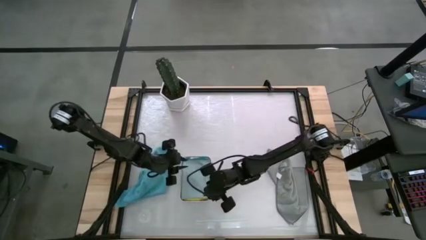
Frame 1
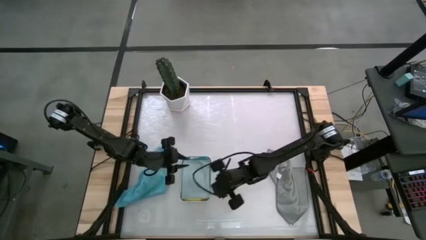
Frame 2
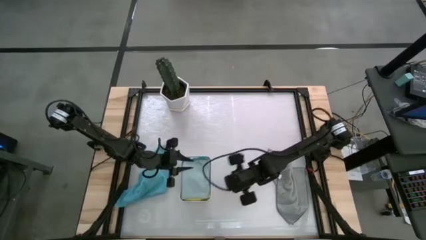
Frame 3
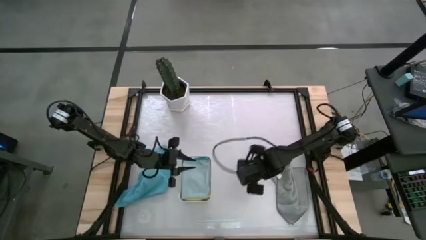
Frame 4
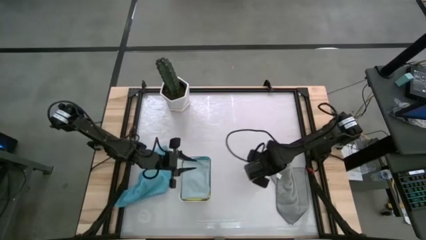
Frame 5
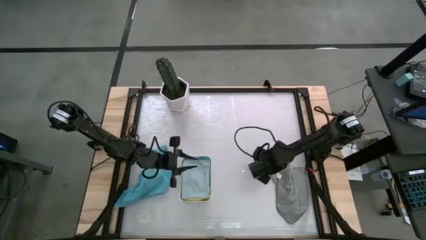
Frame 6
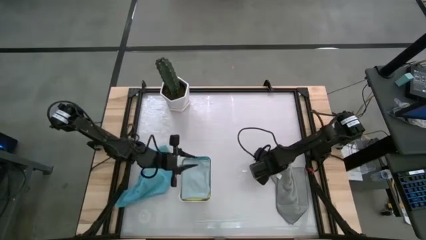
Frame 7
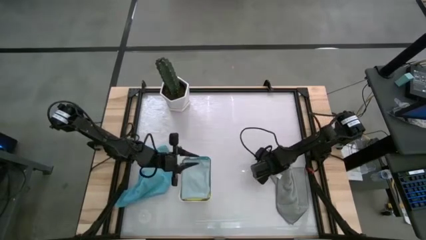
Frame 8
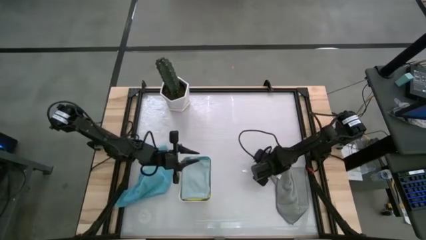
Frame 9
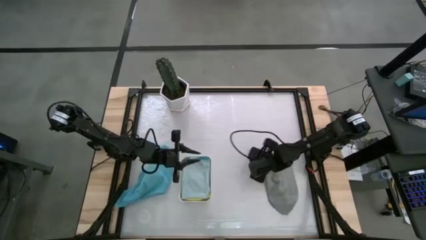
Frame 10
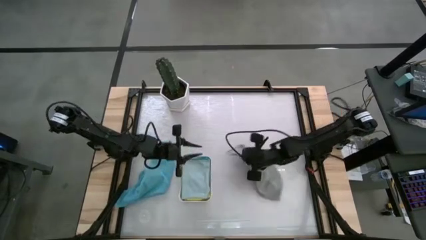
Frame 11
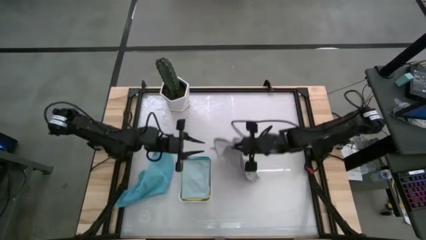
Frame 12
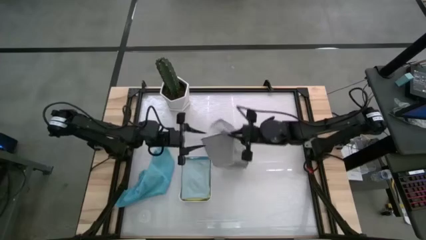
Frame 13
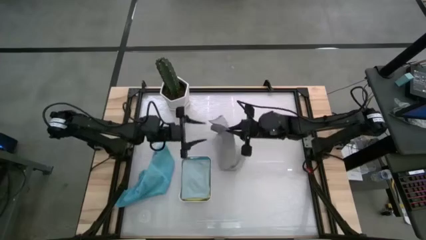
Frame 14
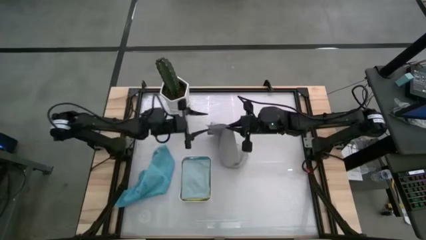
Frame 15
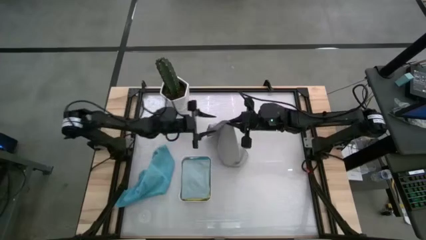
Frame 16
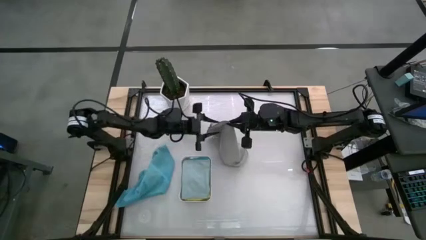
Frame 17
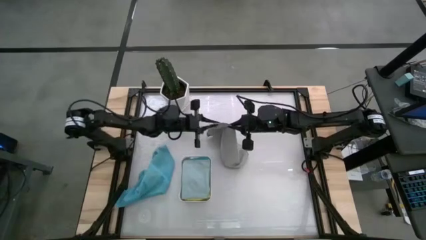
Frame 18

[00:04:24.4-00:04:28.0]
Task: Fold microfiber towels
Fold the gray microfiber towel

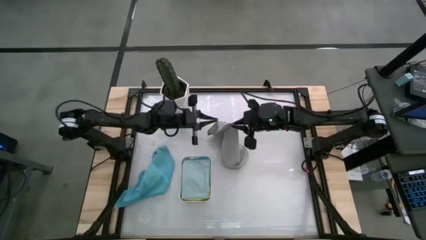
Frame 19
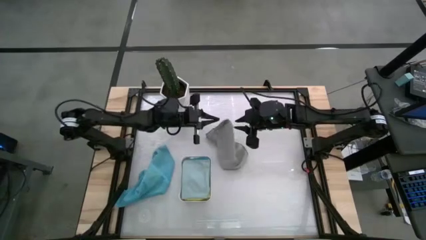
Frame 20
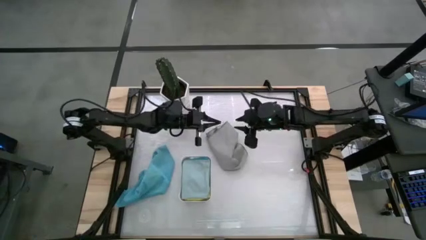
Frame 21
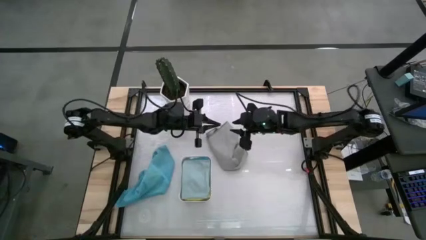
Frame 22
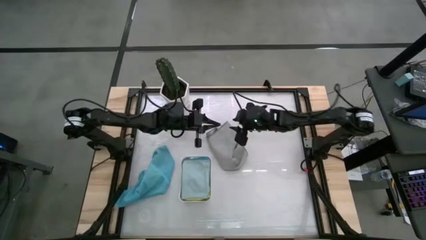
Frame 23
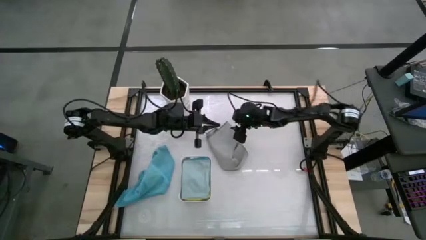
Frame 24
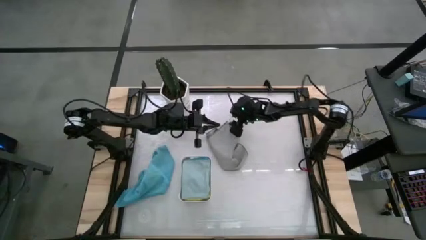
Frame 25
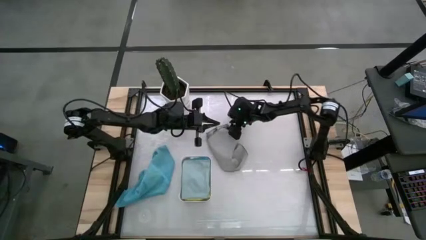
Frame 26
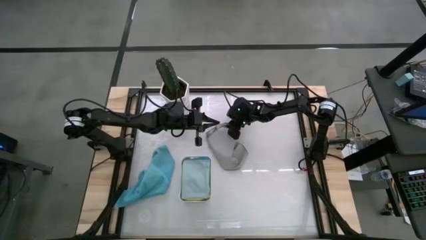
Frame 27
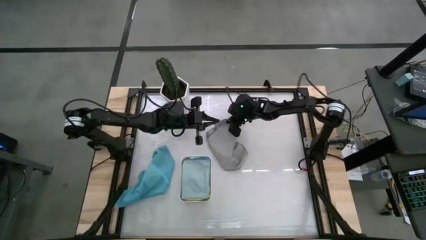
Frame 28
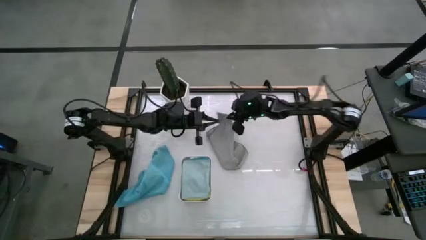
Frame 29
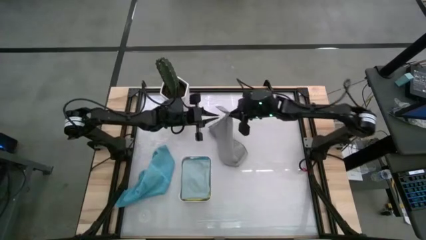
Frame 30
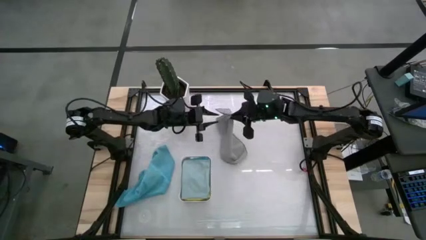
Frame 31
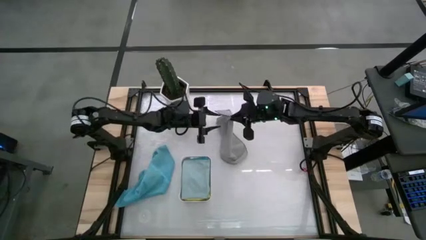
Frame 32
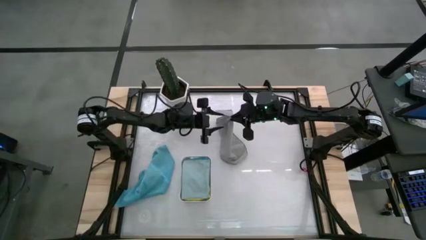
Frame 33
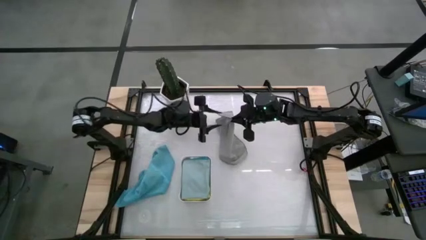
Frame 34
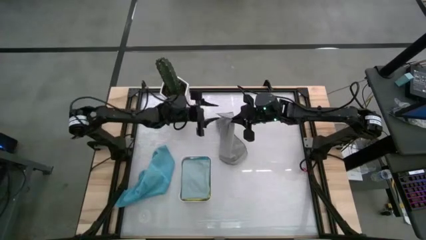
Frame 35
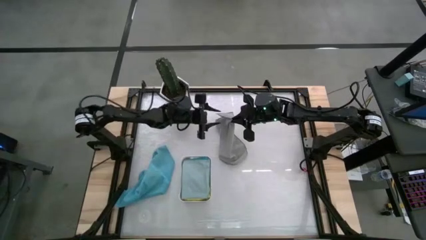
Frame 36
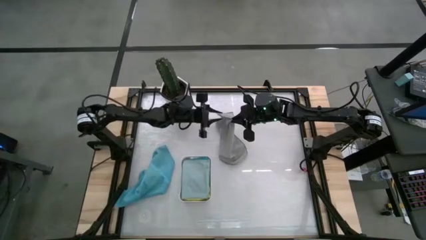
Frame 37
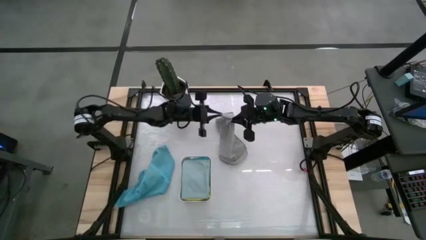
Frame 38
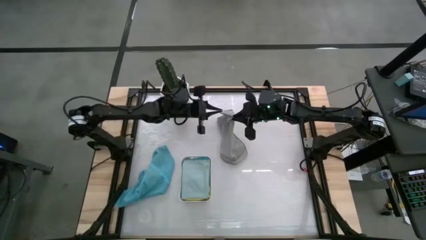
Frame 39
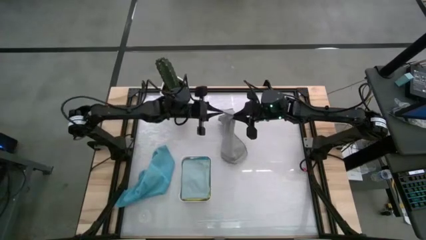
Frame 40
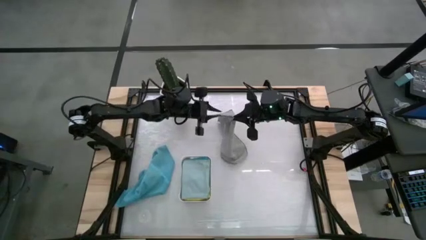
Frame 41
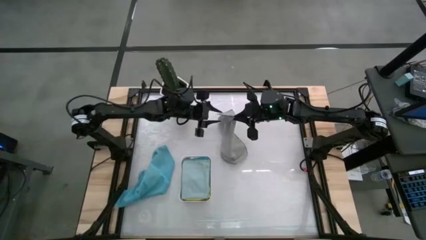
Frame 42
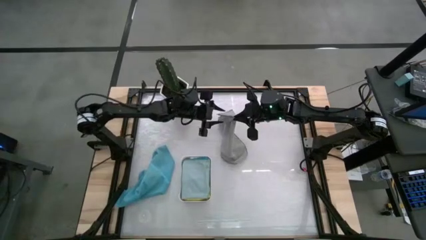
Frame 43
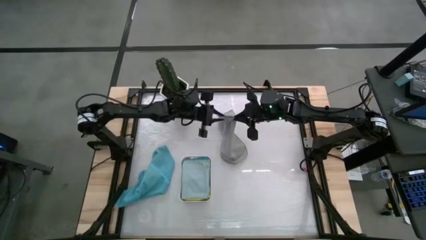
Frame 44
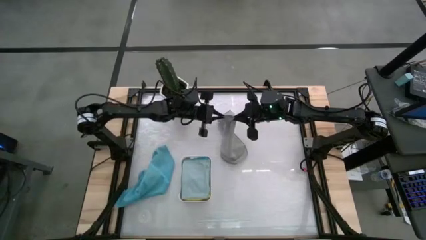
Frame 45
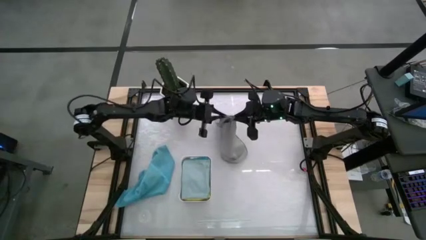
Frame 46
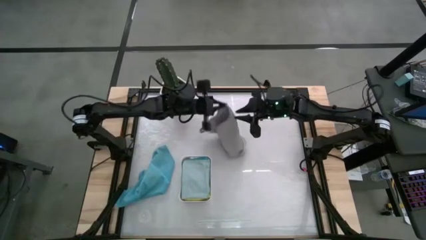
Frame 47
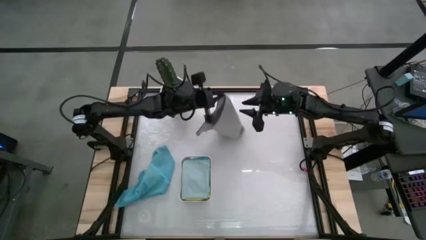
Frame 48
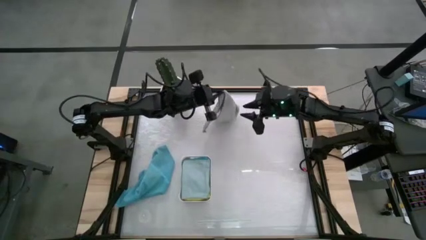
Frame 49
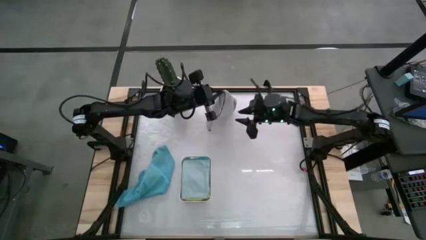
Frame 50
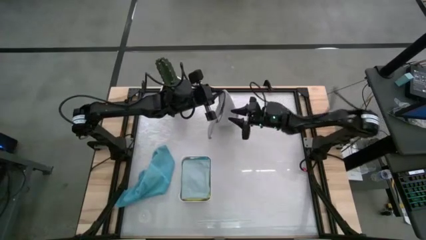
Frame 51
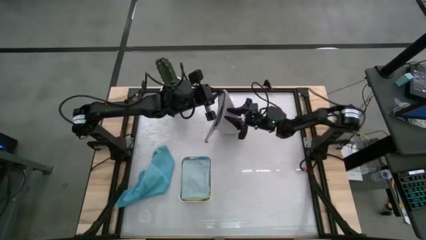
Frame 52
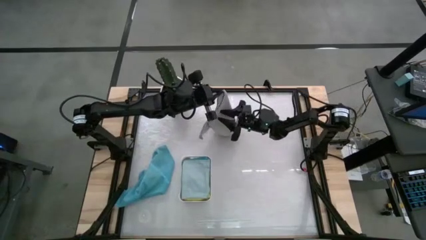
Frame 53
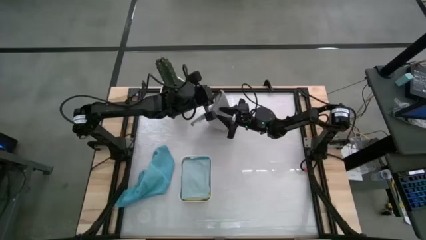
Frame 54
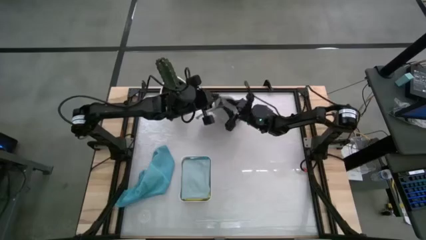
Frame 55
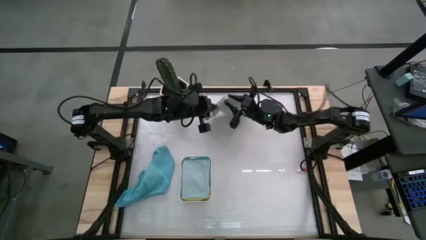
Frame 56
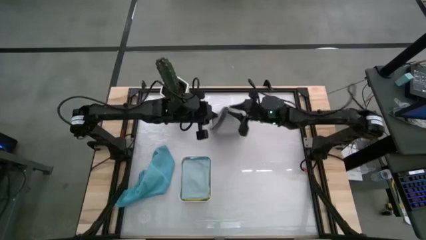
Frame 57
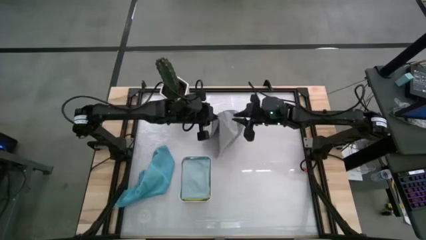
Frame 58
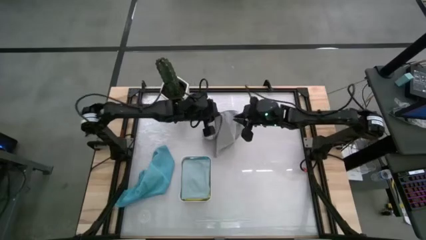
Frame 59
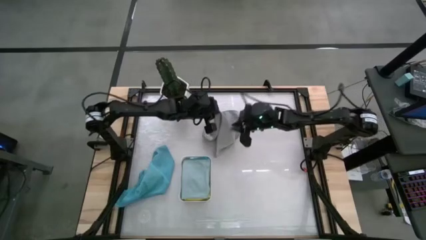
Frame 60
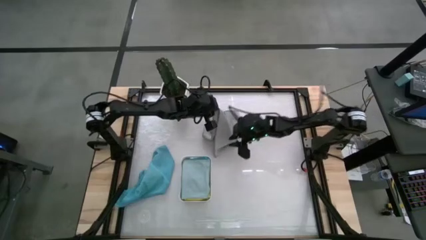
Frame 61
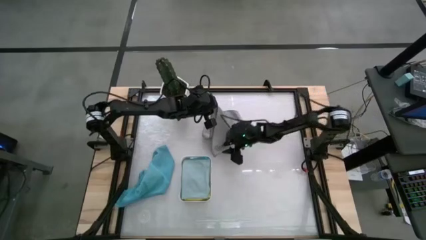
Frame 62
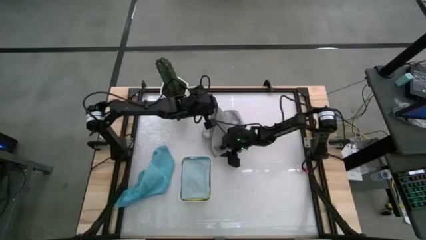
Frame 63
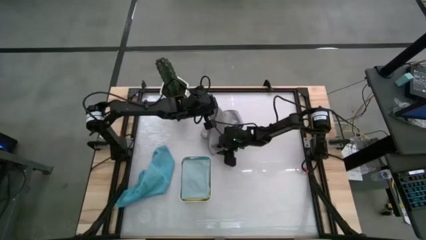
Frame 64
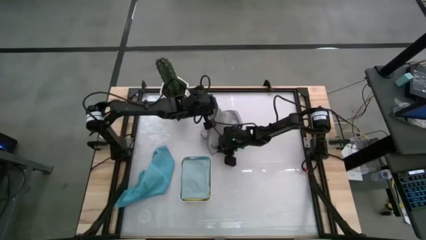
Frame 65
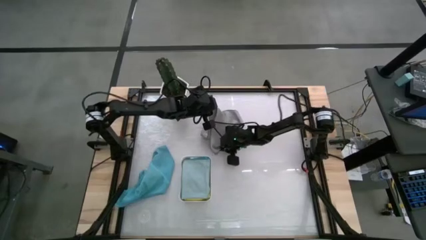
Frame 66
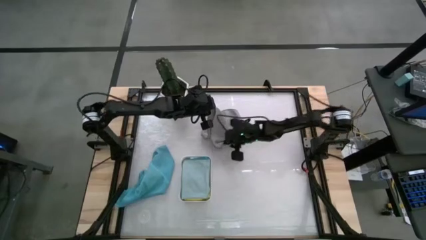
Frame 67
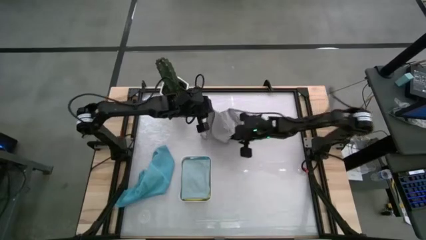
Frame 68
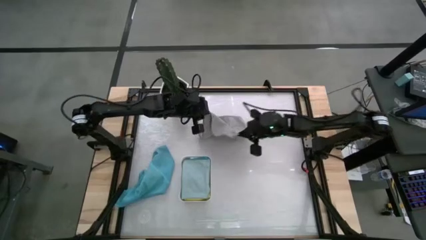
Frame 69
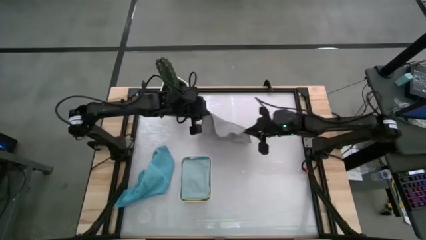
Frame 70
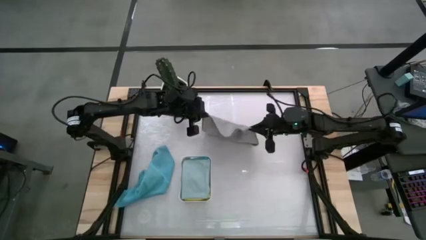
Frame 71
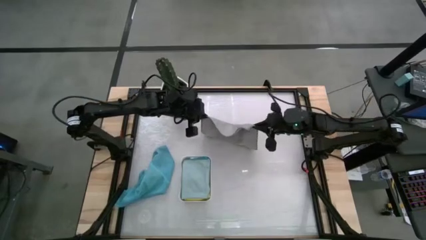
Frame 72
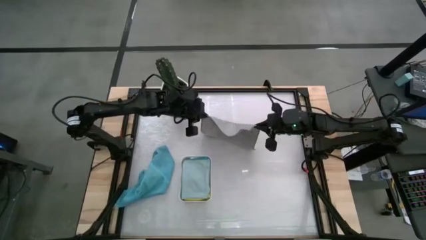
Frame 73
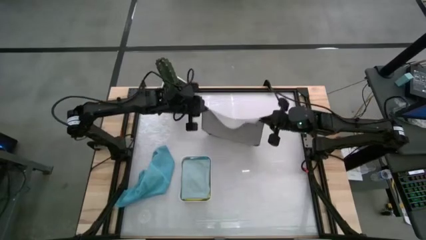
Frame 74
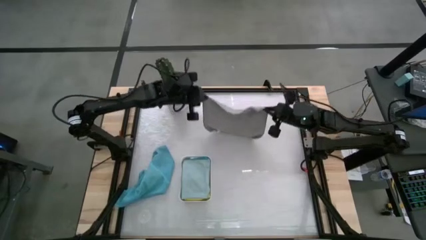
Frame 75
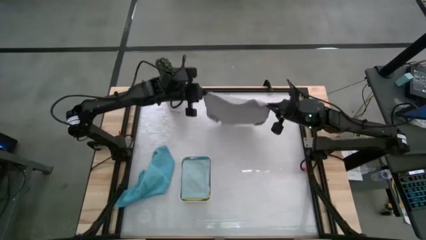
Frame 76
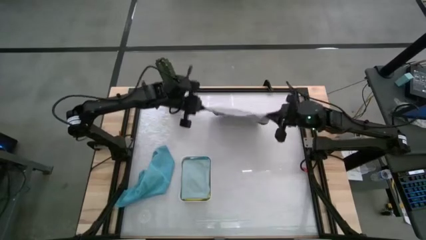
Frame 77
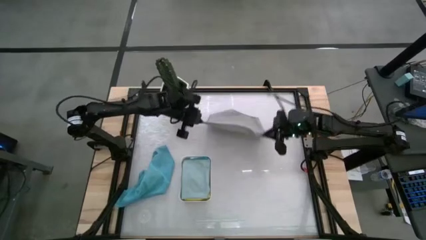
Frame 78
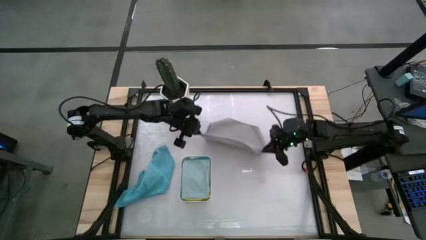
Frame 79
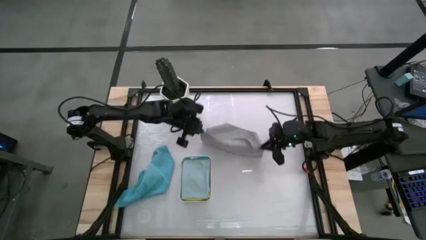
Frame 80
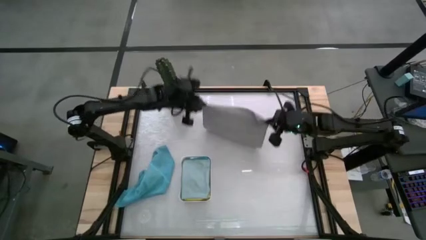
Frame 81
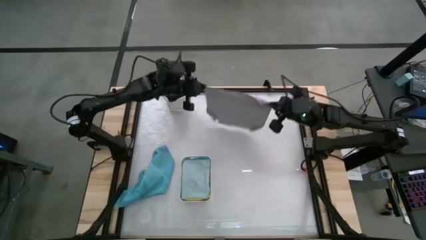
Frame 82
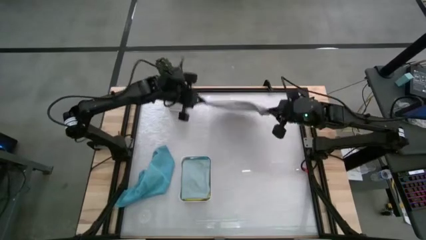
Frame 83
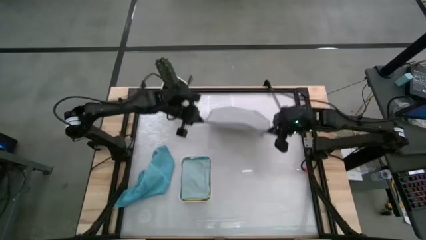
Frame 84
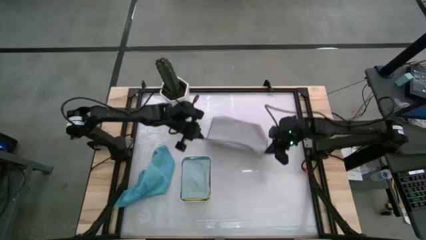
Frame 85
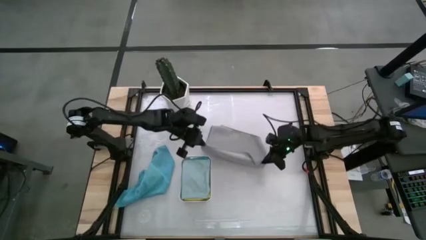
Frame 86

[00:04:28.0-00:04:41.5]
Fold the gray microfiber towel
